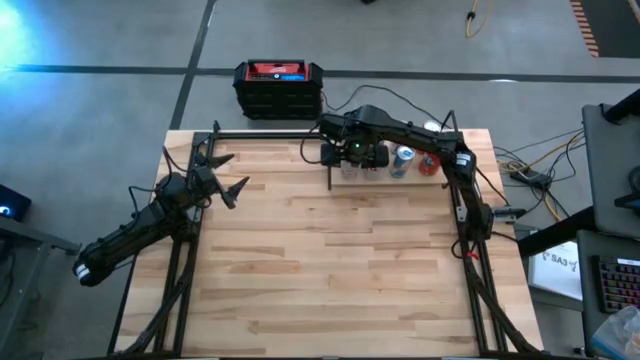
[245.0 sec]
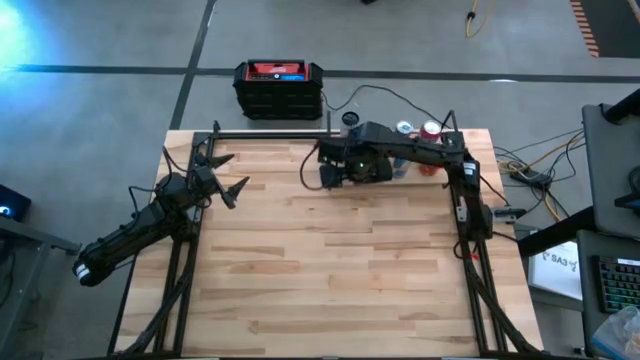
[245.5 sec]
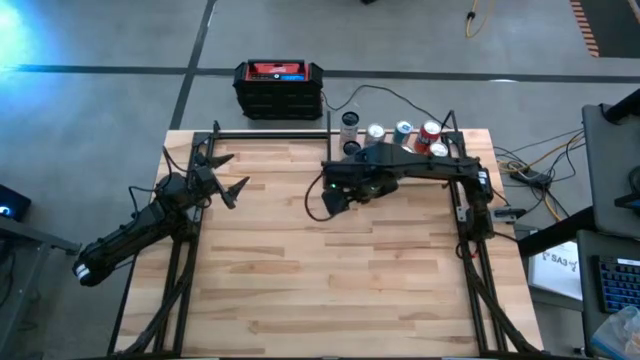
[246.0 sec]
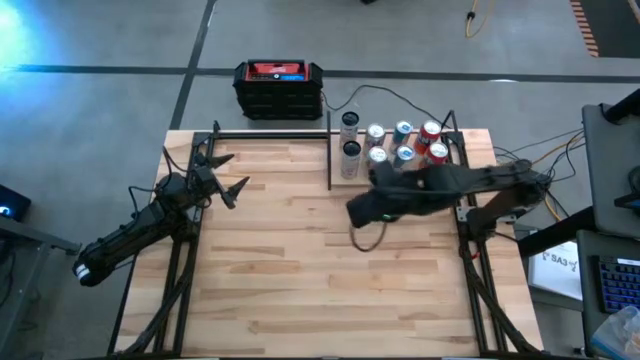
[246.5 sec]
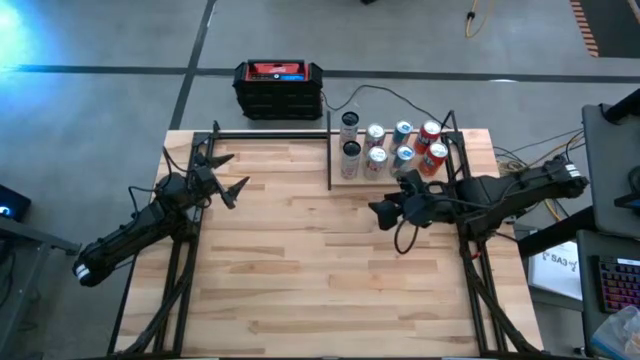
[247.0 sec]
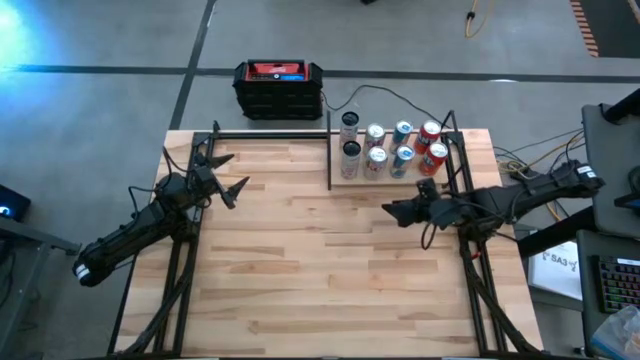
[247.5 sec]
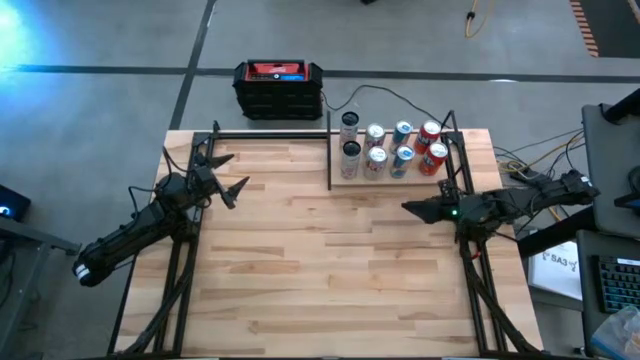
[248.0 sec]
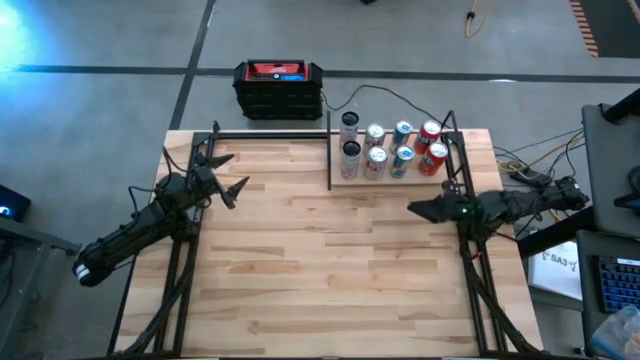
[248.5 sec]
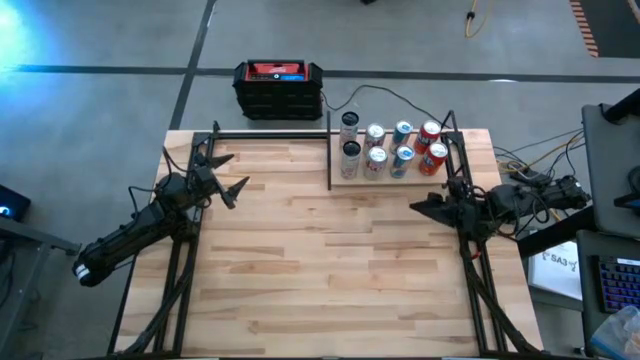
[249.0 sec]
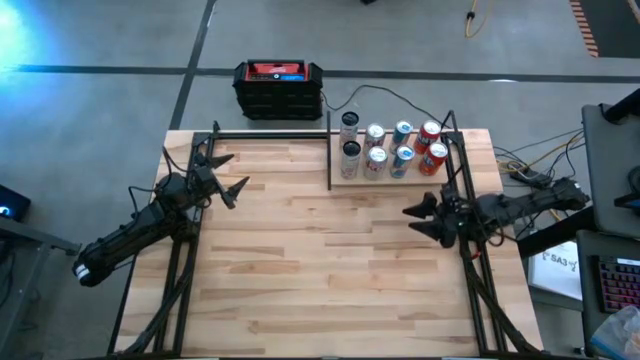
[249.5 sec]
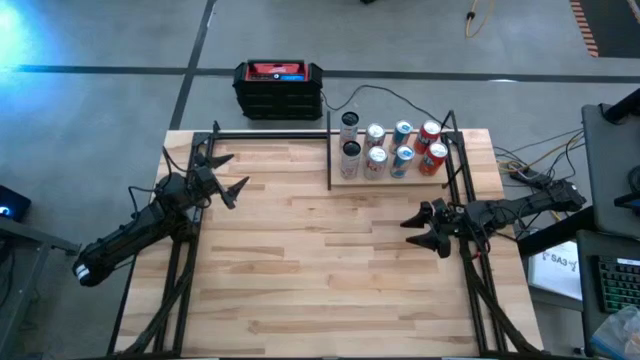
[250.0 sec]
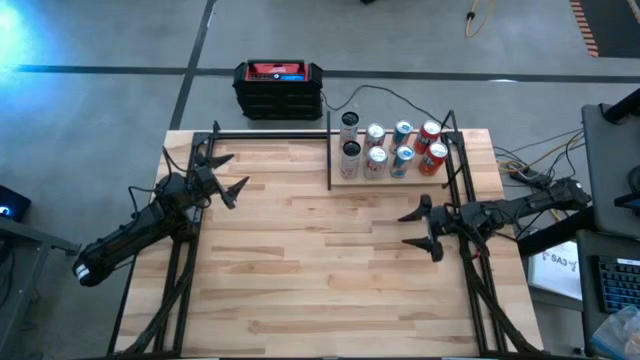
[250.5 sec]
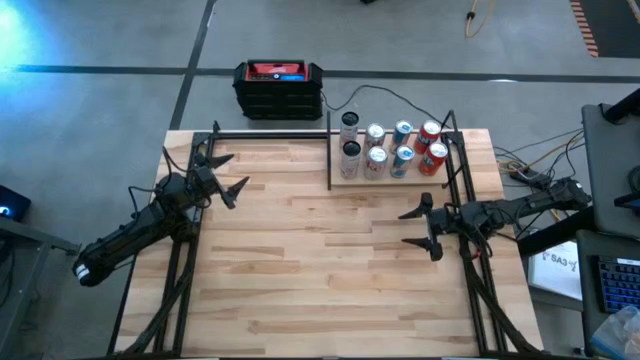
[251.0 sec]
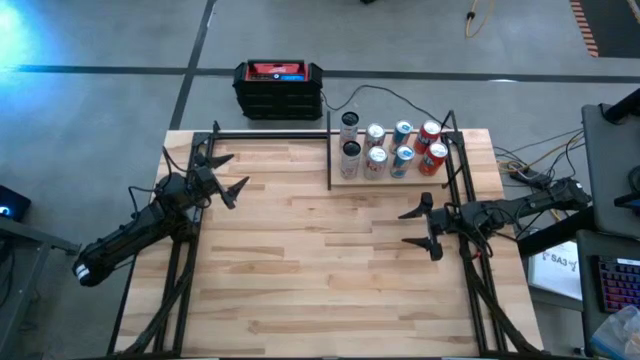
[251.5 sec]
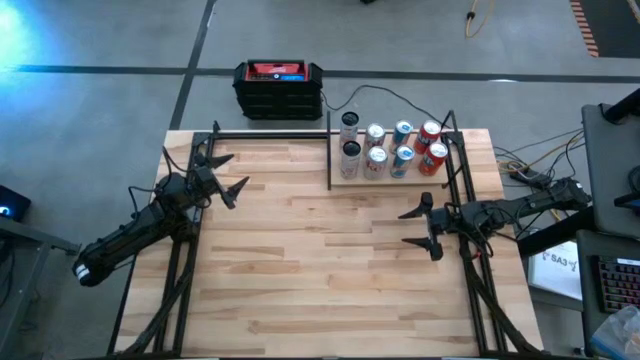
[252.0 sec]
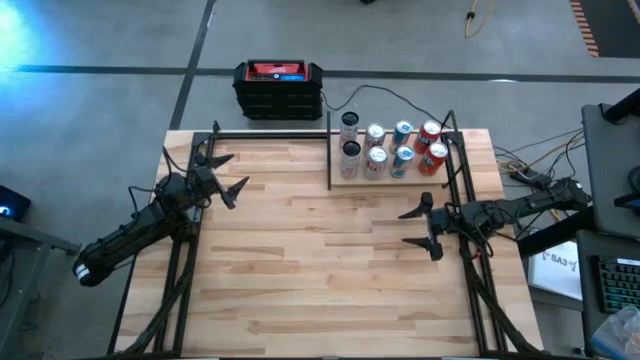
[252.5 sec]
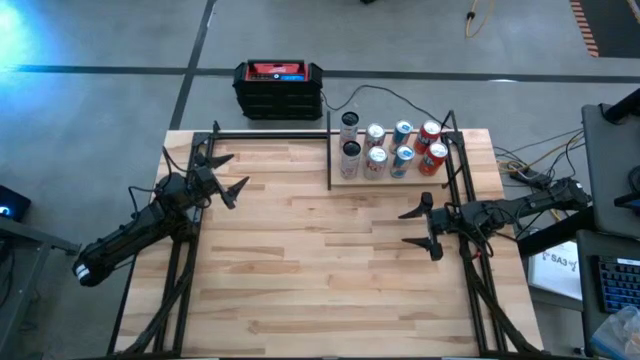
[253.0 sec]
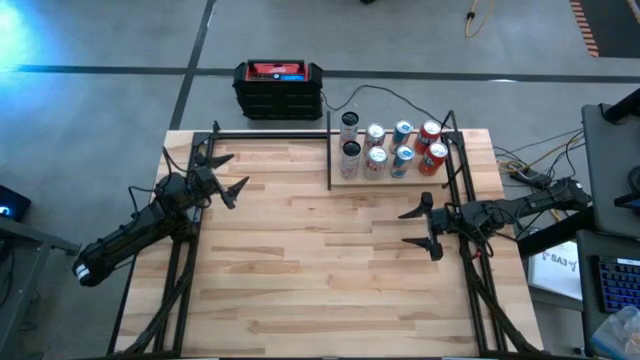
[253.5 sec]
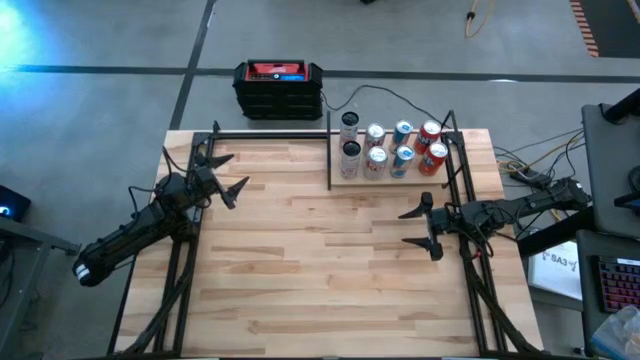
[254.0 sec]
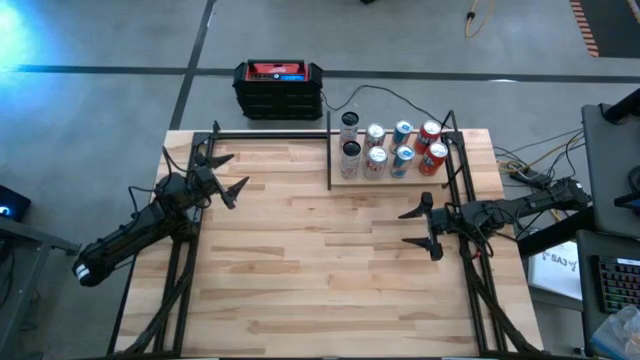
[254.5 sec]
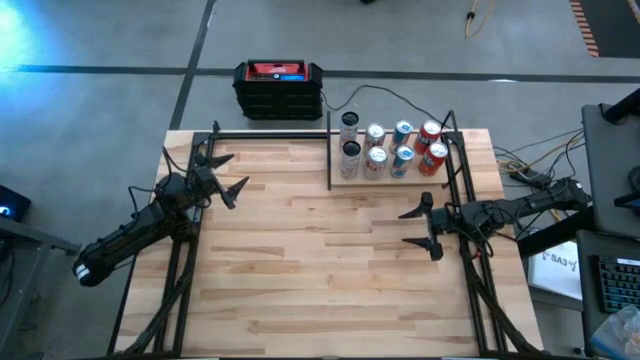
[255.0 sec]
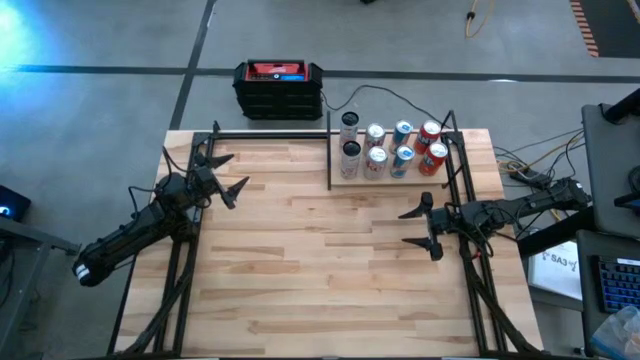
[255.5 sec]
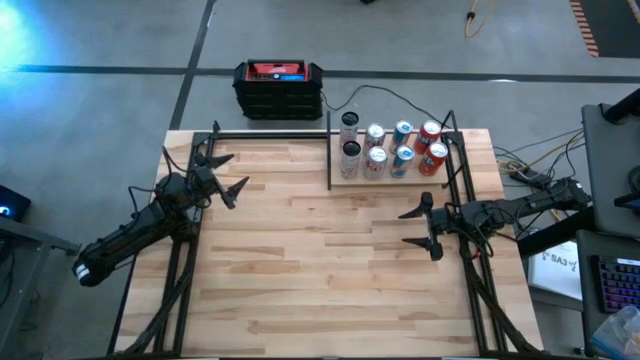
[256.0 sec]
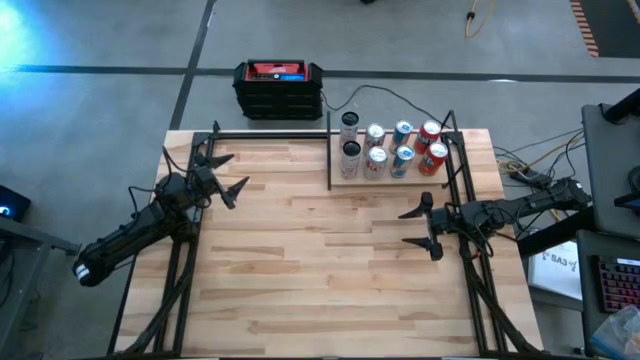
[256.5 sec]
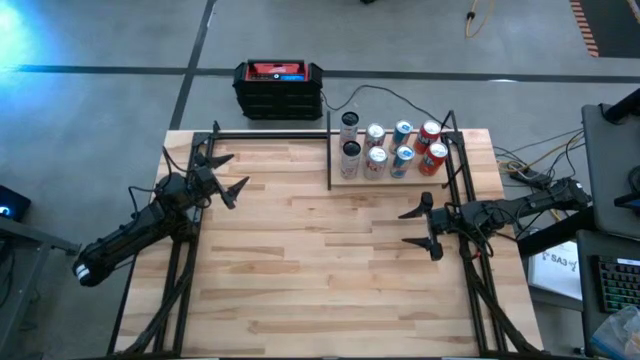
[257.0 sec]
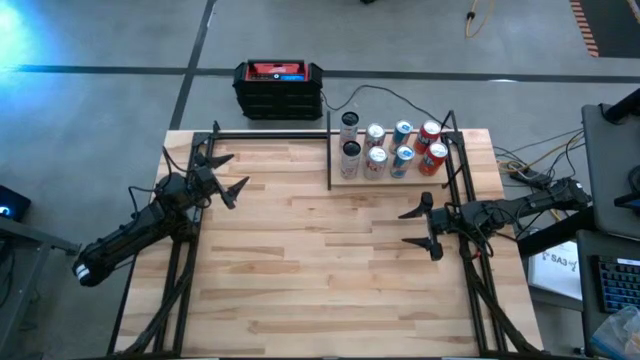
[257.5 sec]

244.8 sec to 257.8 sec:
Task: Place canned beverage on shelf
Return to Home Position

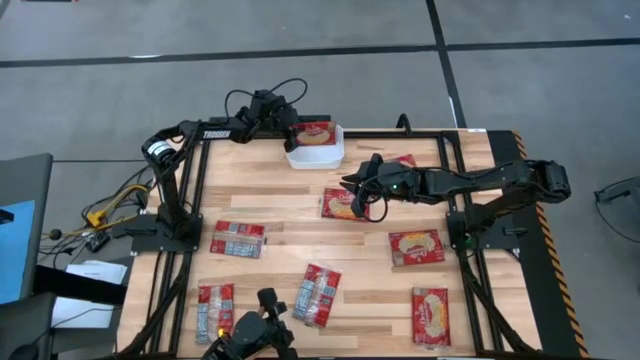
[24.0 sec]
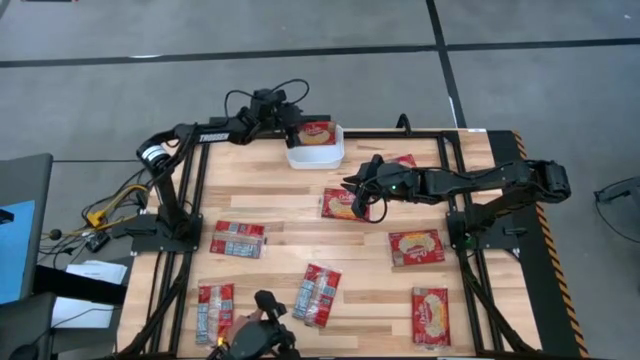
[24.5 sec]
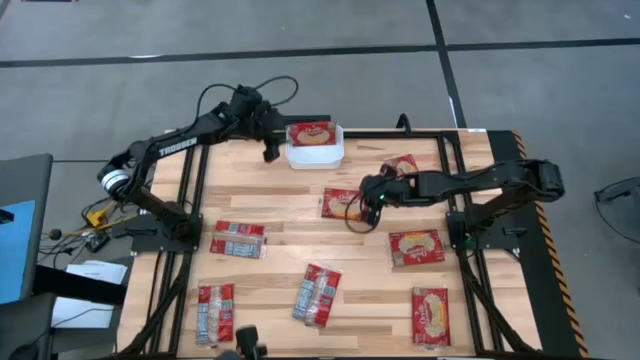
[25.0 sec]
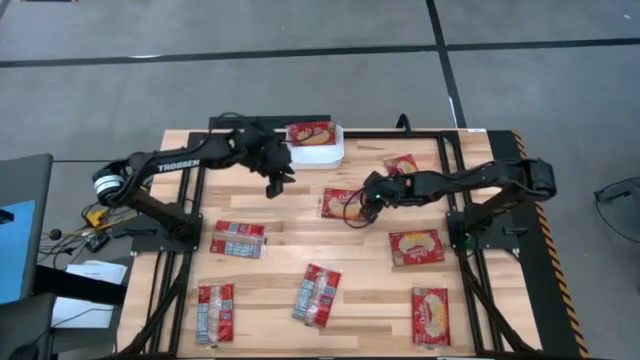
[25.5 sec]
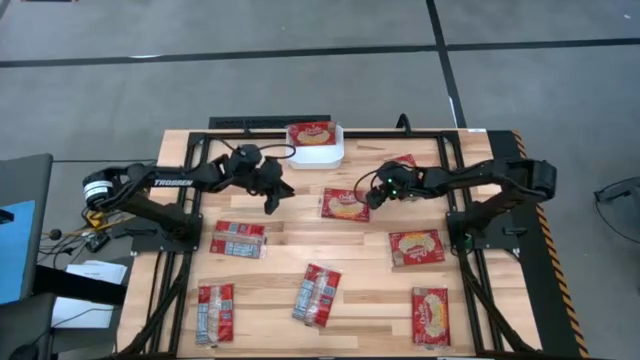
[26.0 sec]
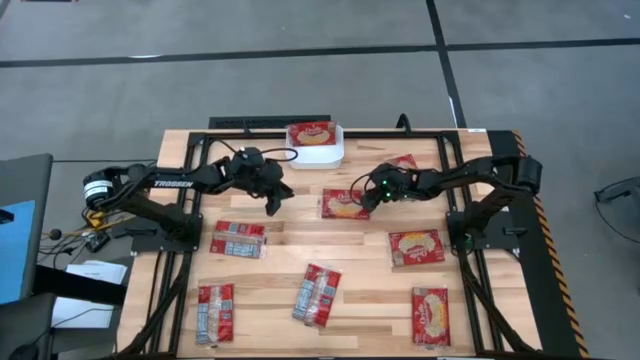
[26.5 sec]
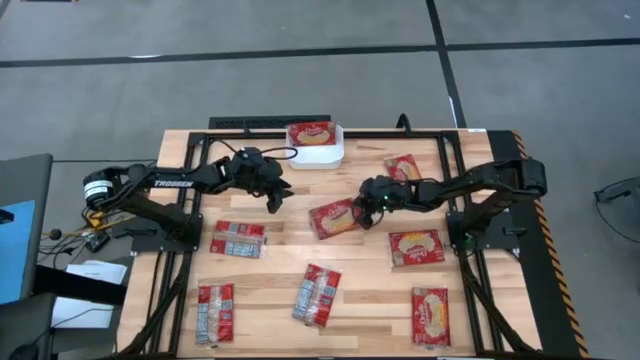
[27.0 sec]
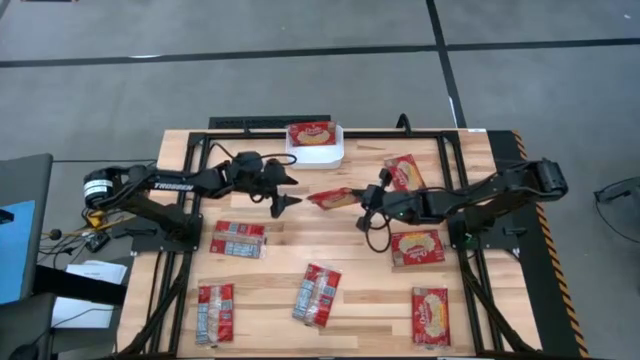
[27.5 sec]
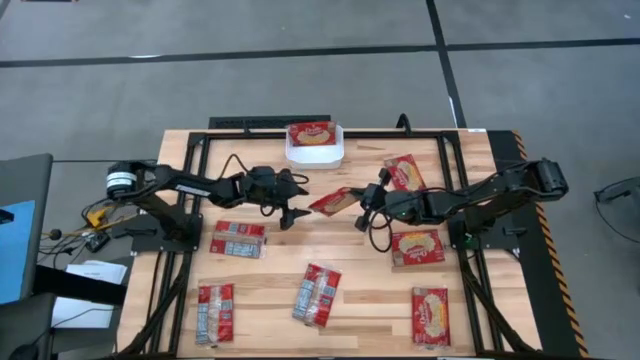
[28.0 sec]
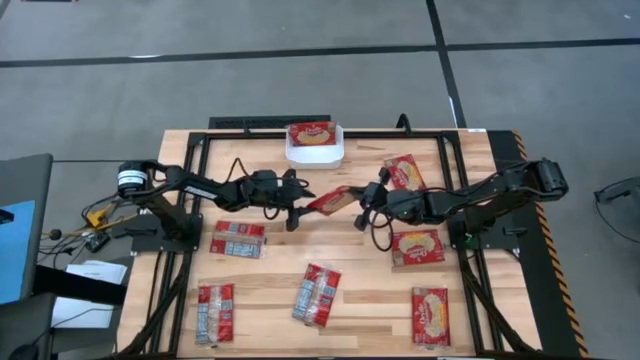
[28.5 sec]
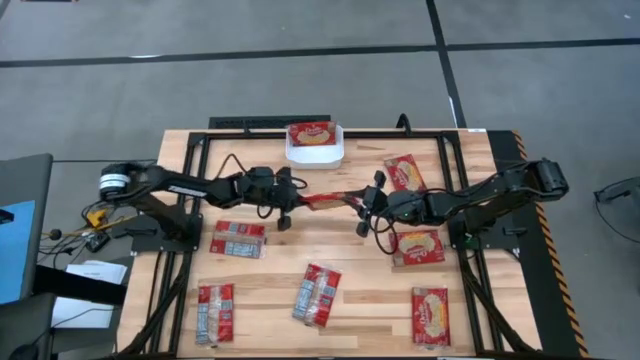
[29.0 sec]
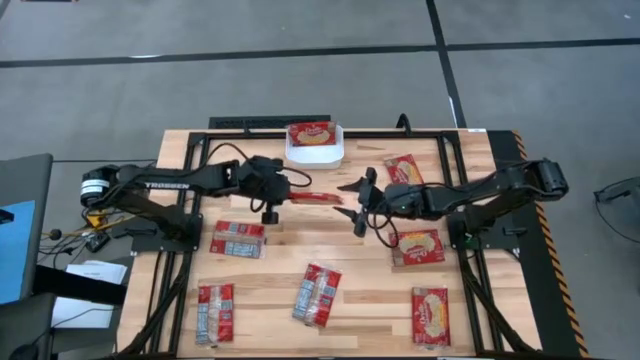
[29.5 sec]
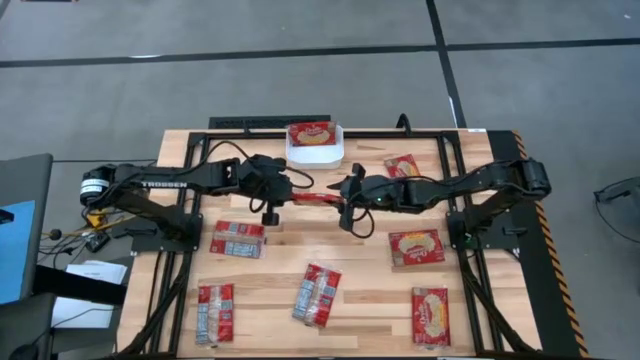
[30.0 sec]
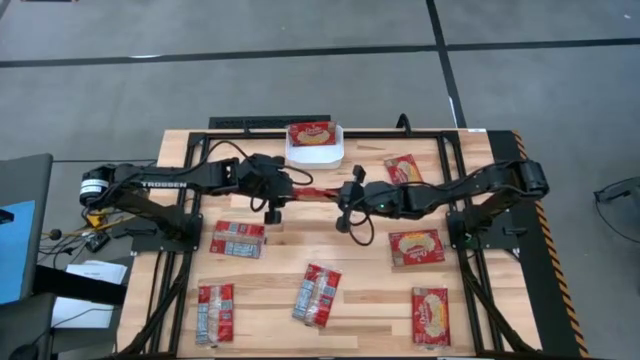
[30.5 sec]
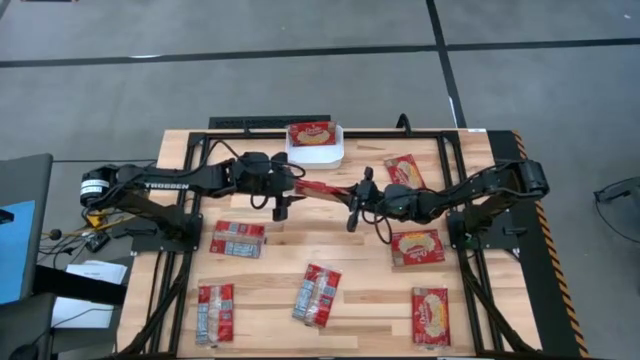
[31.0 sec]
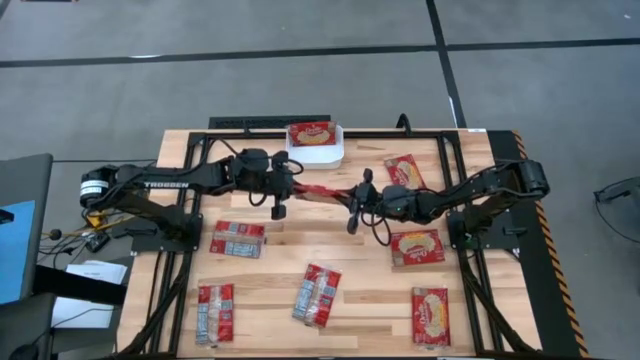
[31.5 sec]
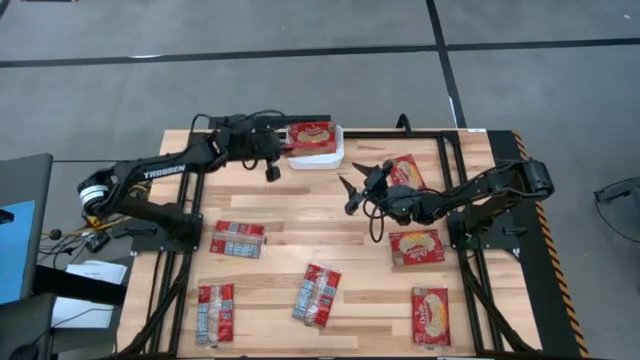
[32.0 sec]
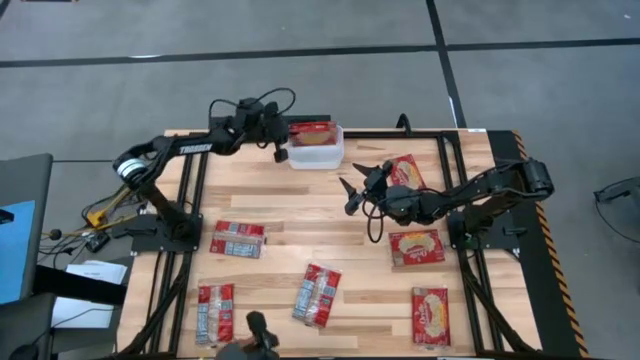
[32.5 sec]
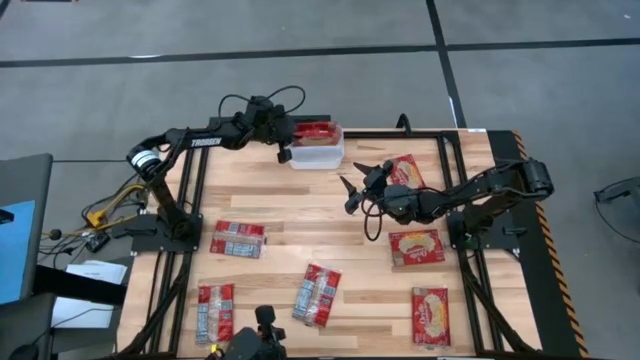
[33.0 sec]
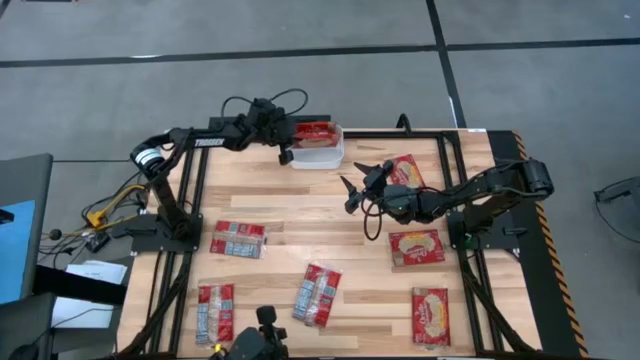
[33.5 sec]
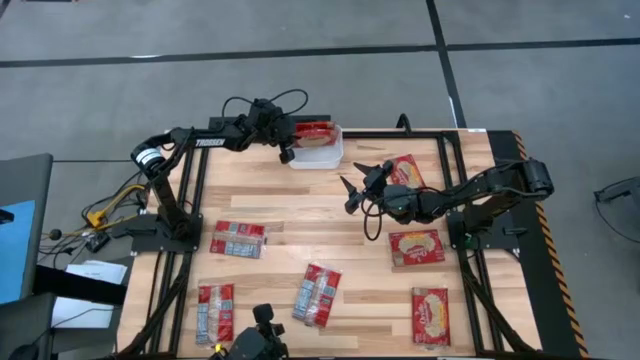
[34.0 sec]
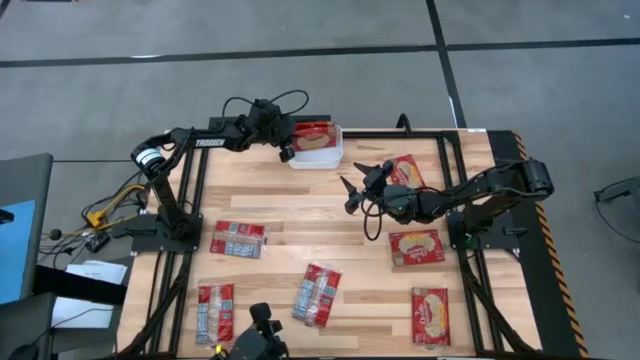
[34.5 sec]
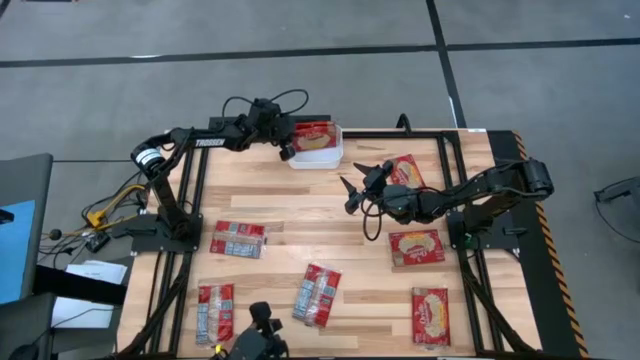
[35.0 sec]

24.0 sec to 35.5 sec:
Task: Sort popcorn bags into baskets
Put the red popcorn bag into the white bin
